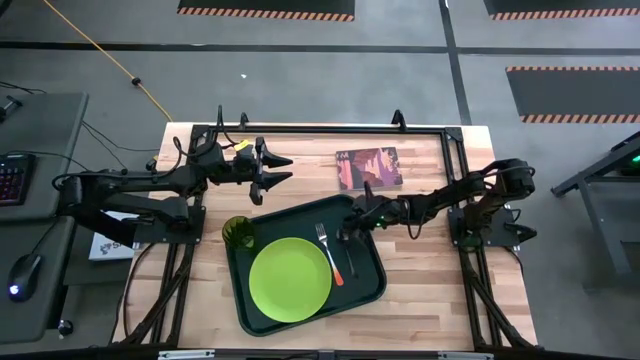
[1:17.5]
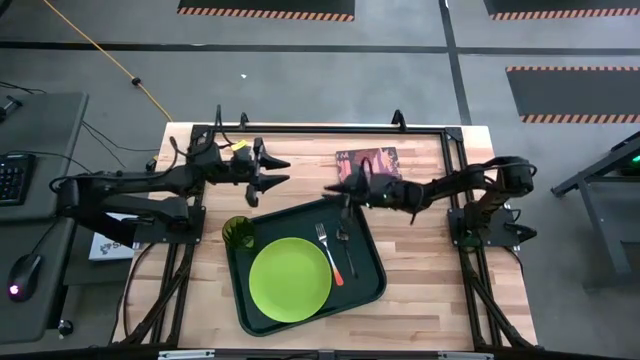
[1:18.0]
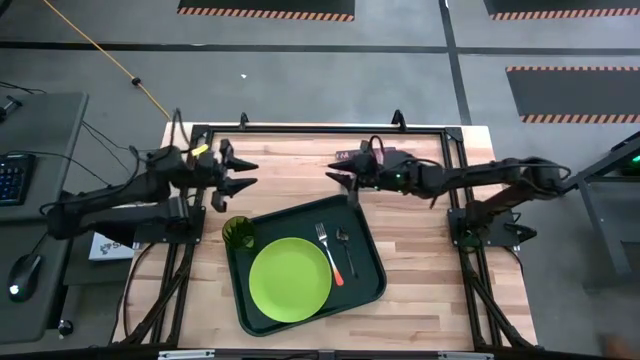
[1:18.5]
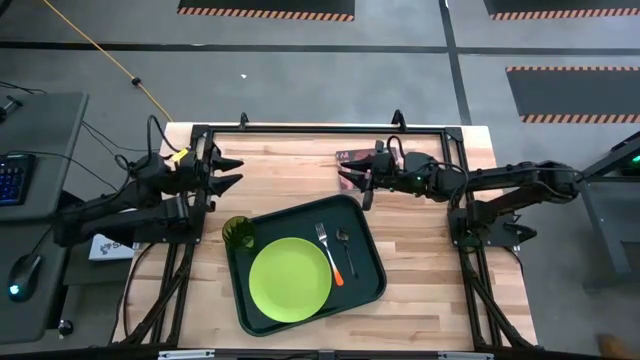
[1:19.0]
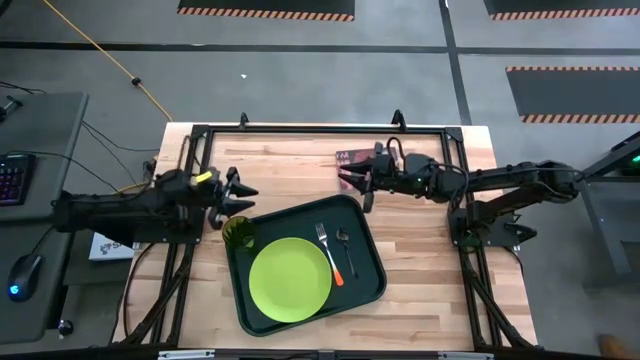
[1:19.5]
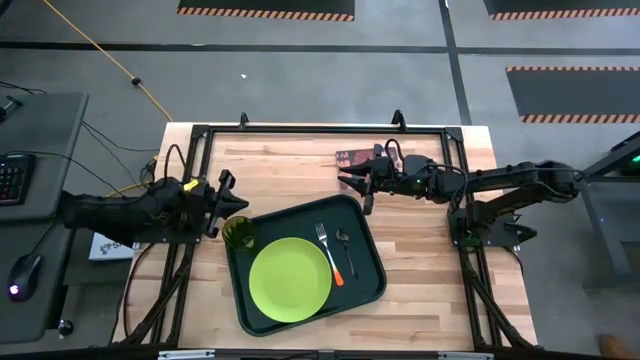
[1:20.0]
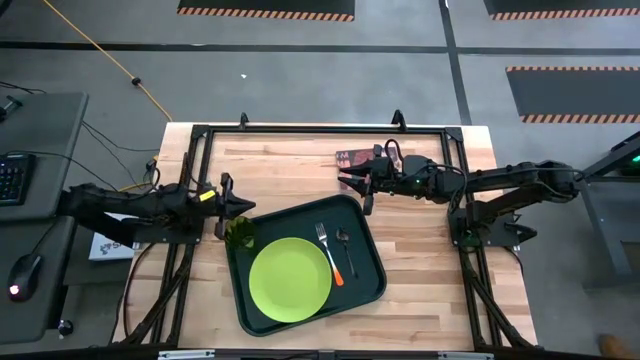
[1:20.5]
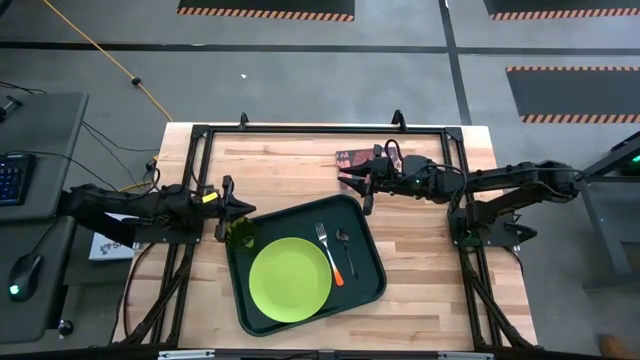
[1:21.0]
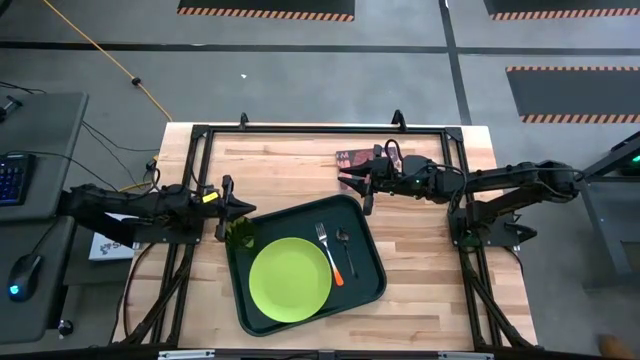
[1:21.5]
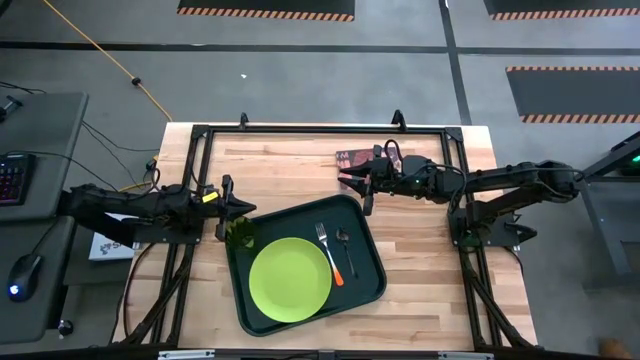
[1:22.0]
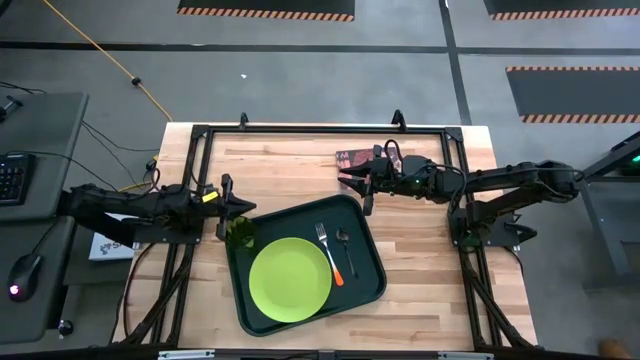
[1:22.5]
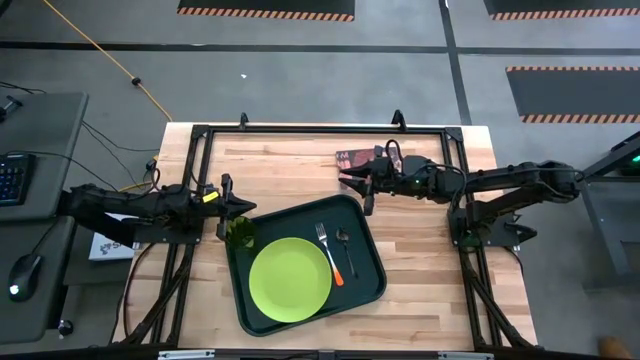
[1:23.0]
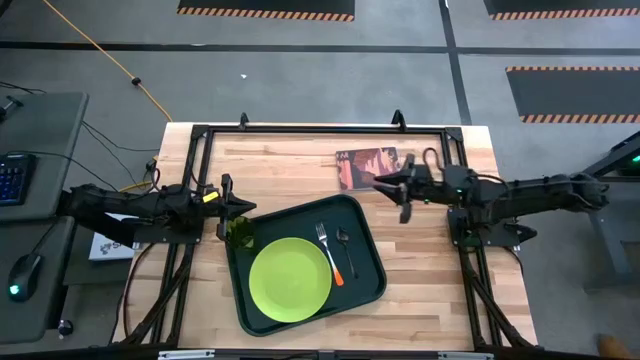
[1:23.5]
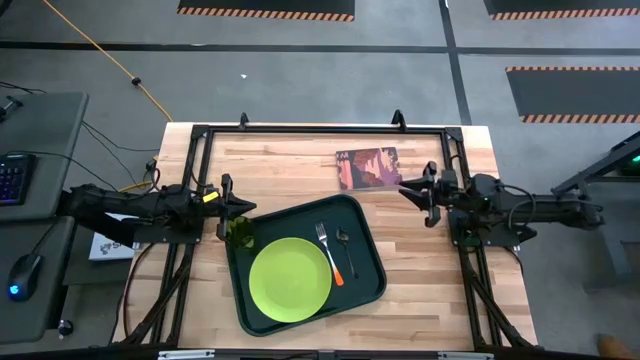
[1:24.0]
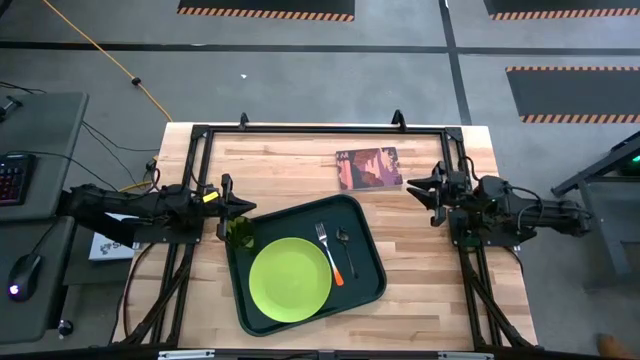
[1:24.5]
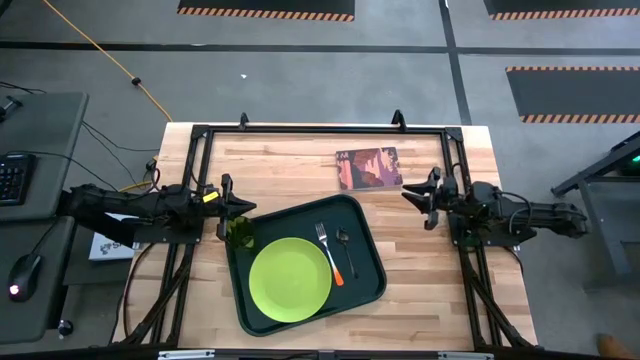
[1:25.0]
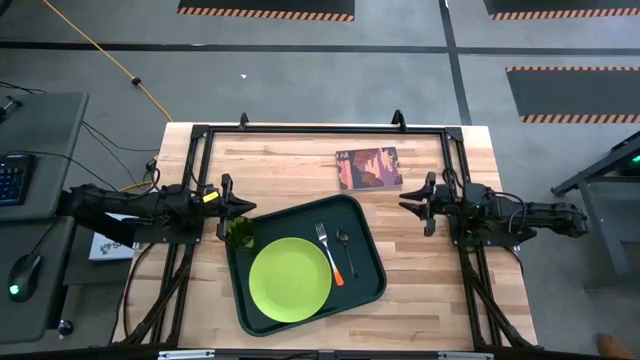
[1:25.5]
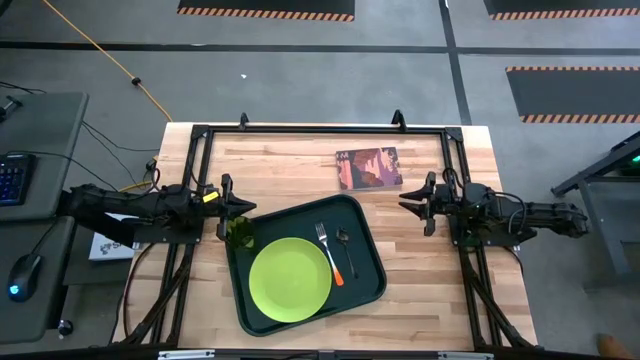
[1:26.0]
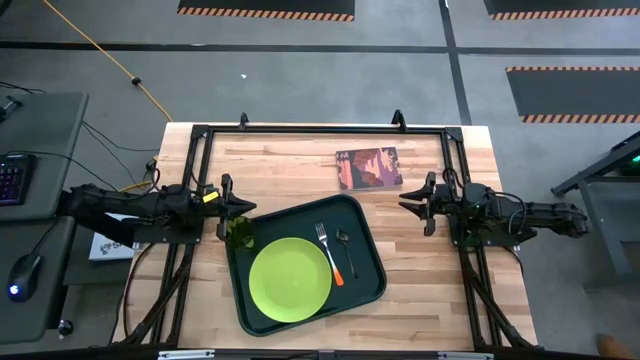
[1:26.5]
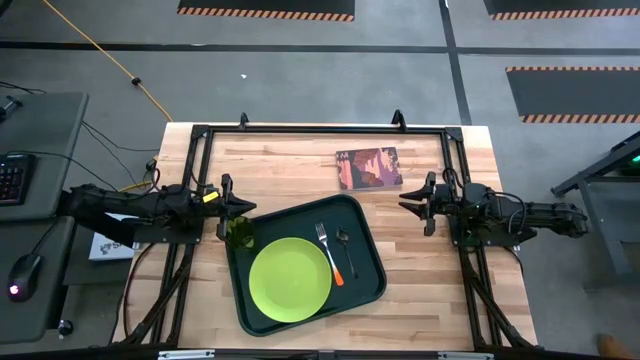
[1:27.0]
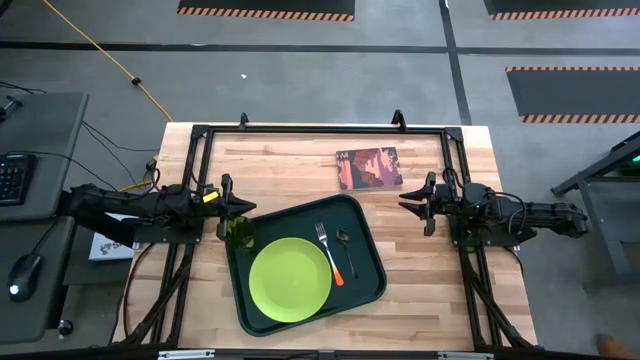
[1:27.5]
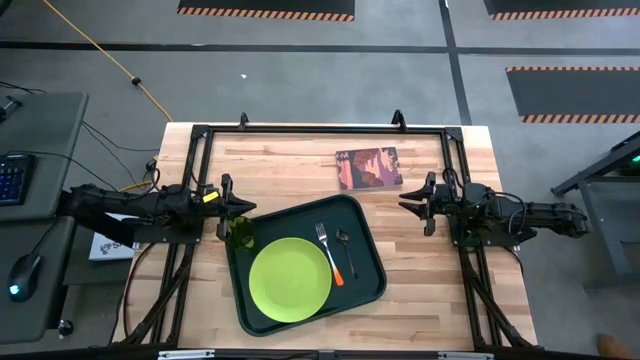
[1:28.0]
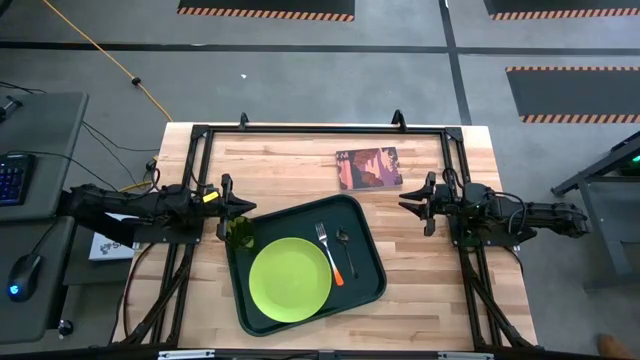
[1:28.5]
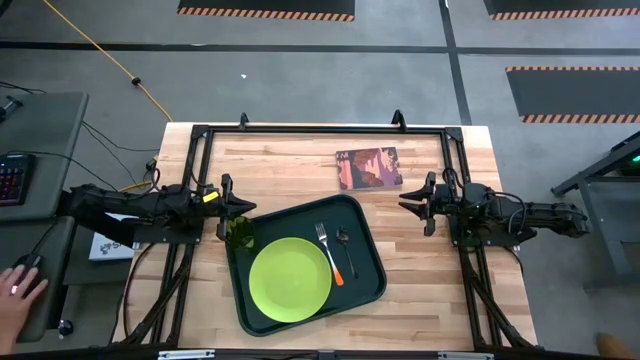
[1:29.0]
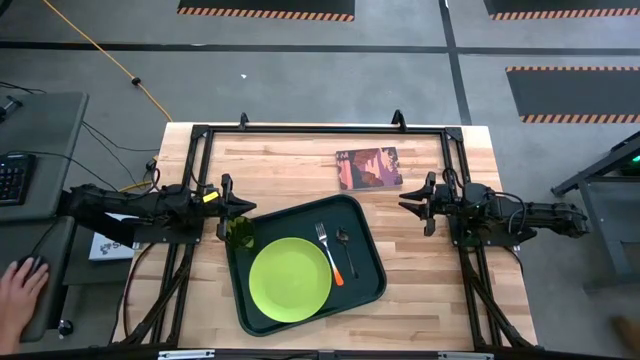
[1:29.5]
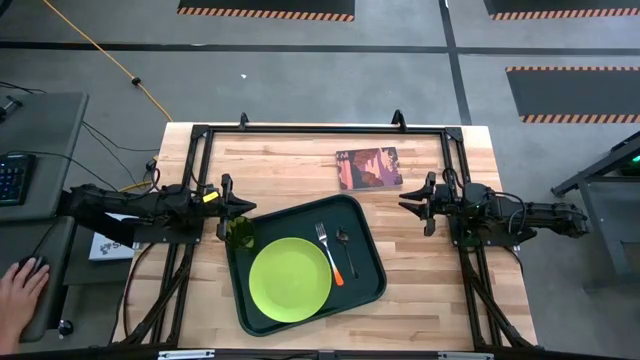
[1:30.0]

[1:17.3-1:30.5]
Task: Pick and place plate/cup/fork/spoon on tray
Return to Home Position

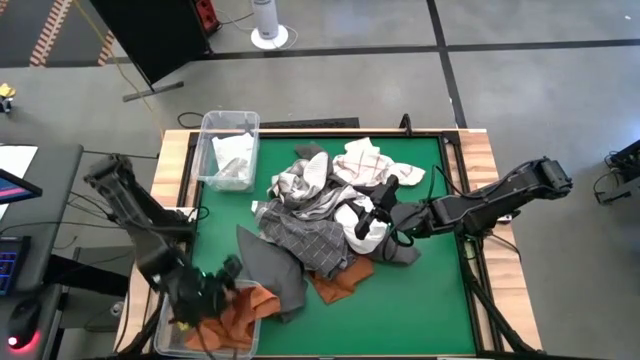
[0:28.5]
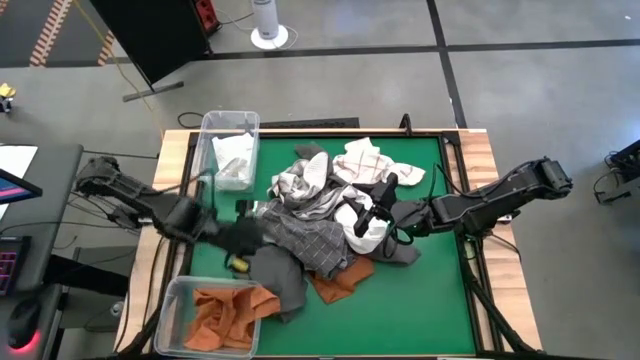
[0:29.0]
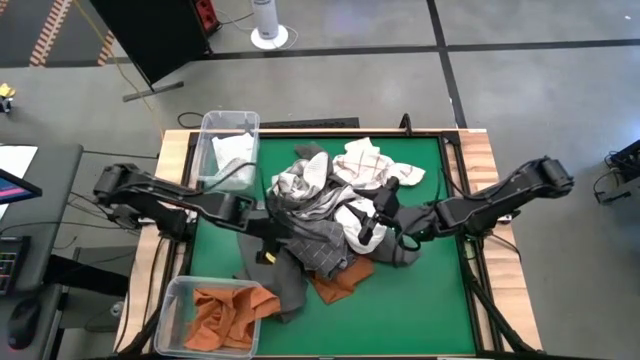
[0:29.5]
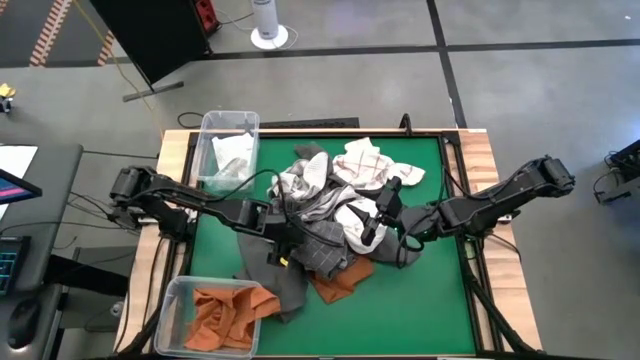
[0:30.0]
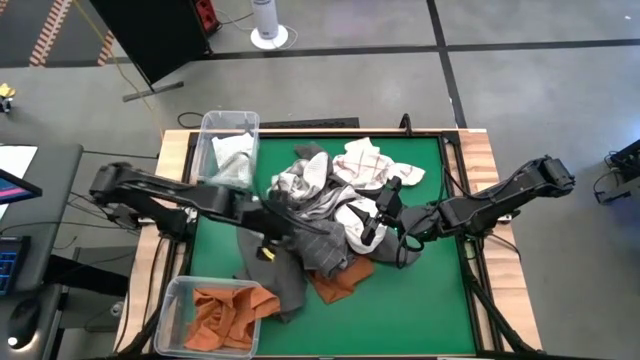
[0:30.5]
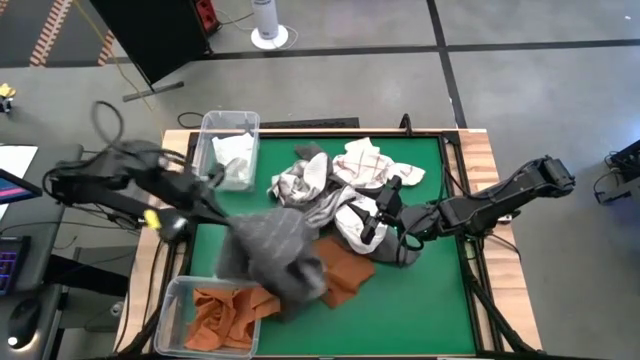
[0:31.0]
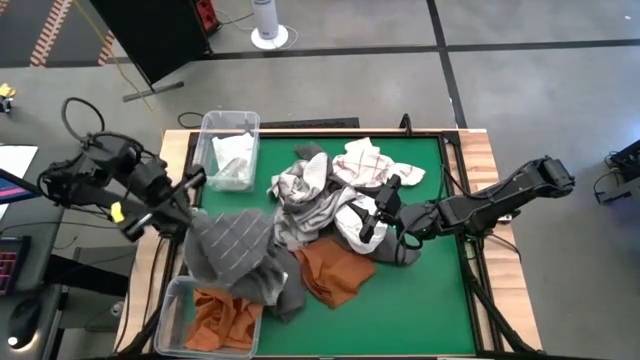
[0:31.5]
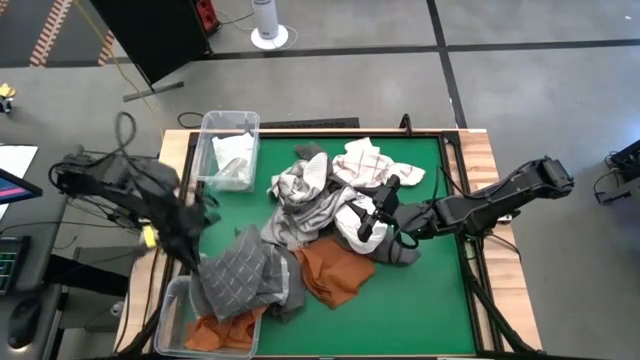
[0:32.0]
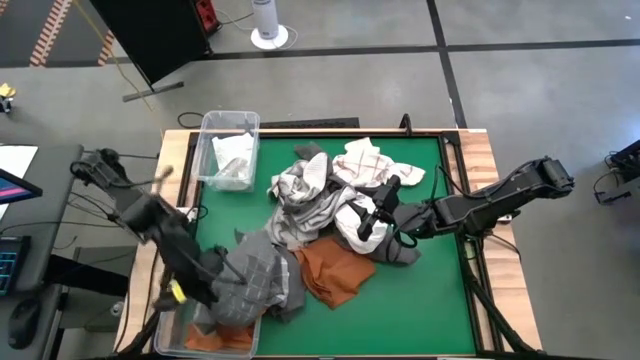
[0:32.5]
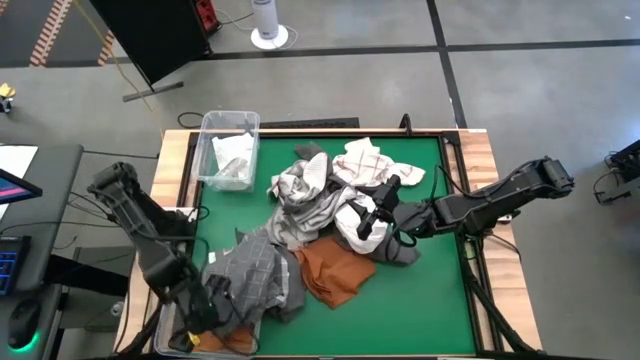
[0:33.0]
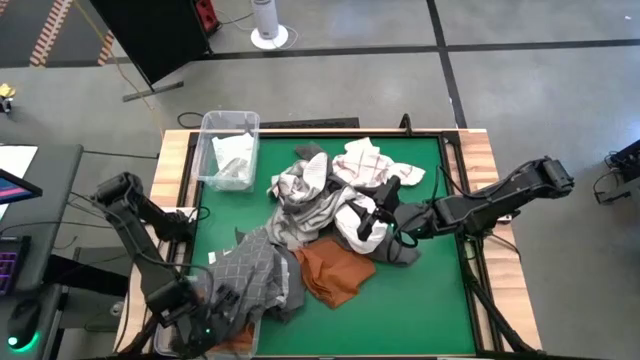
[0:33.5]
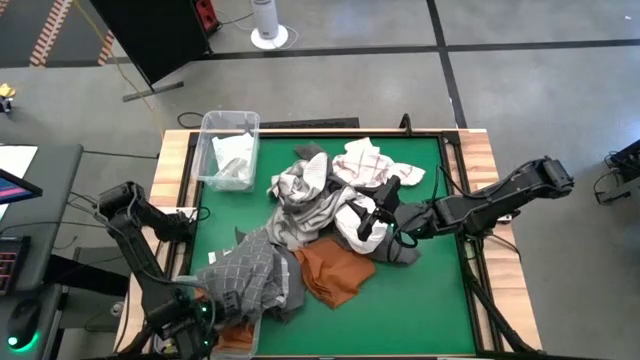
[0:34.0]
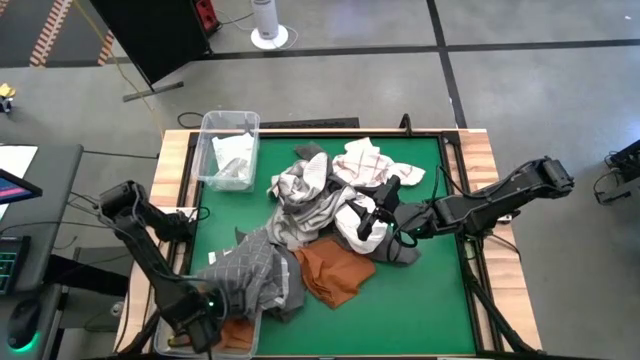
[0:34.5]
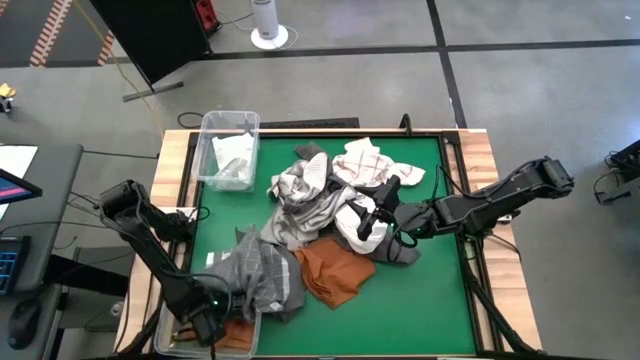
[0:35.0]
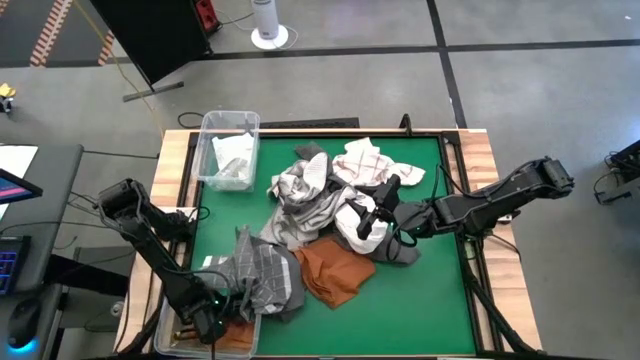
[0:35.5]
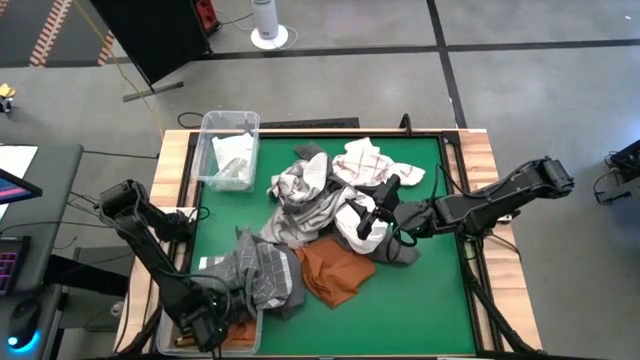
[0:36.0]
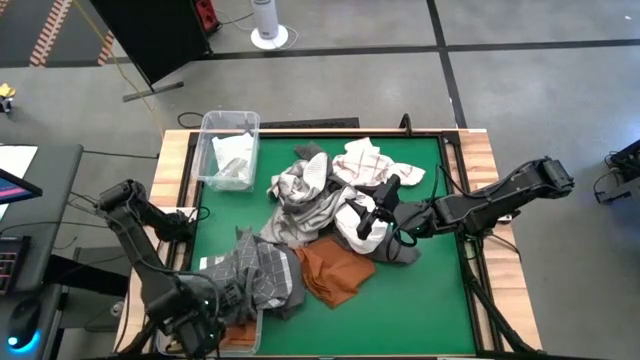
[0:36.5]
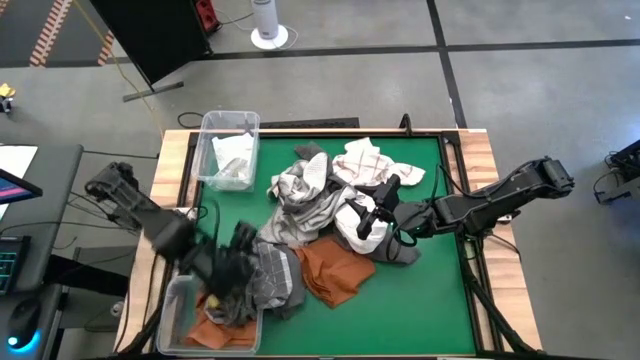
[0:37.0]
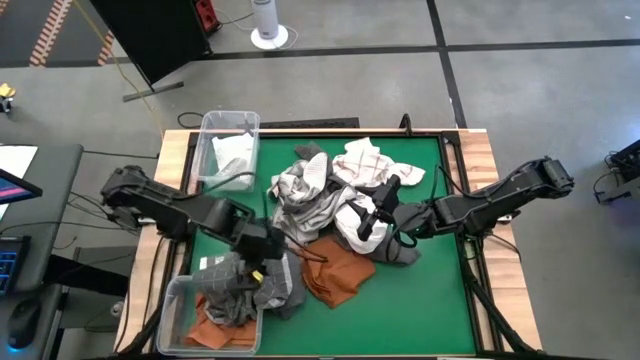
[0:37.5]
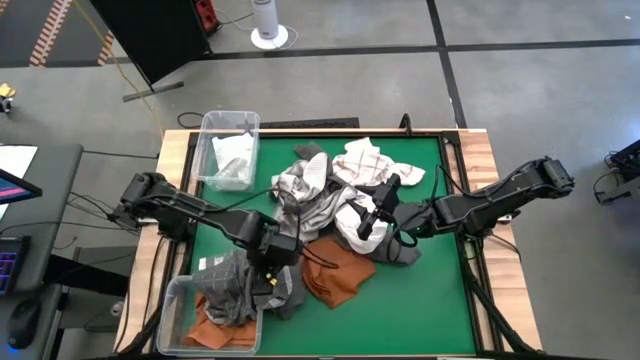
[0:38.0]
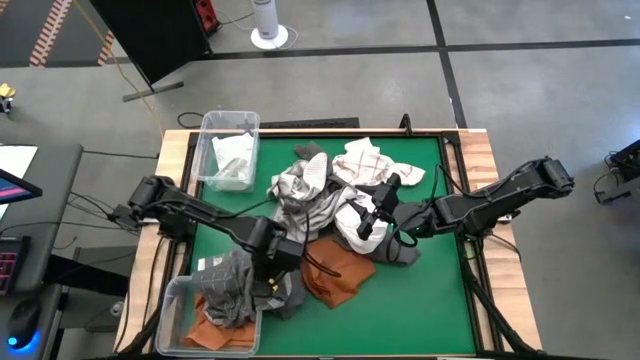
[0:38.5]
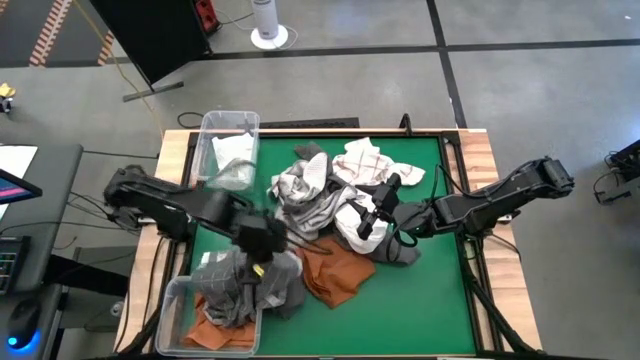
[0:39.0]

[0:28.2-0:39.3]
Task: Sort towels by color in basket
Put the gray patterned towel into the bottom transparent bin
